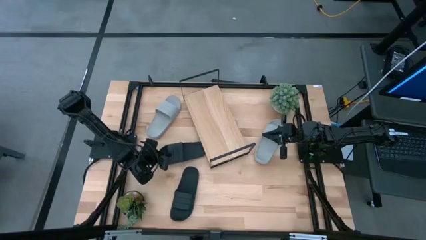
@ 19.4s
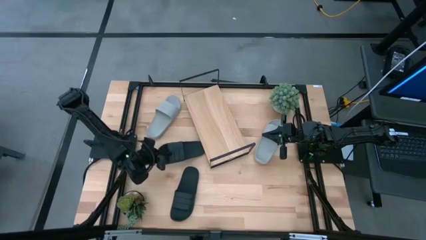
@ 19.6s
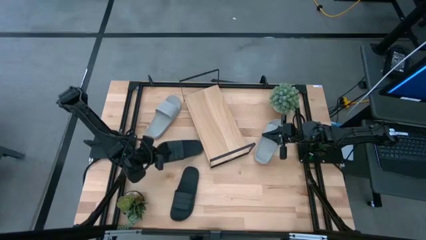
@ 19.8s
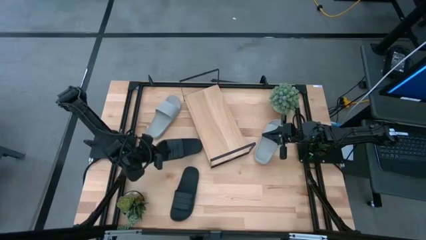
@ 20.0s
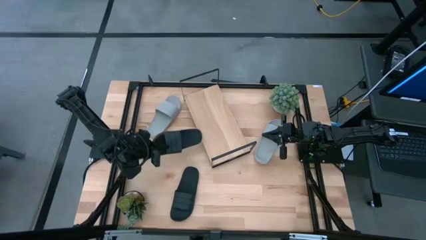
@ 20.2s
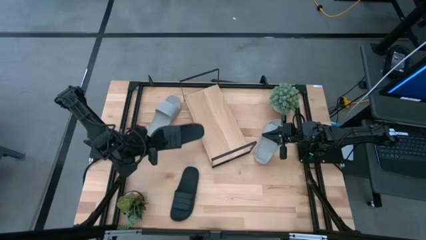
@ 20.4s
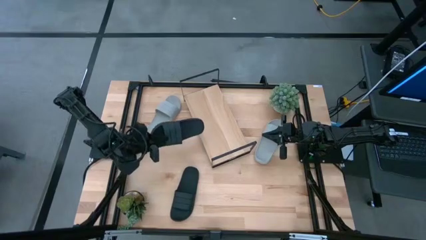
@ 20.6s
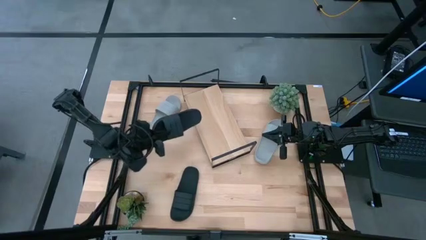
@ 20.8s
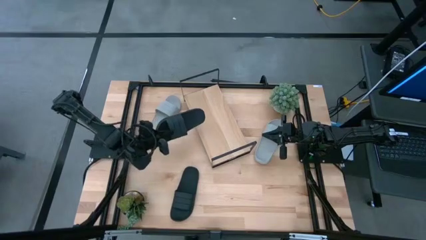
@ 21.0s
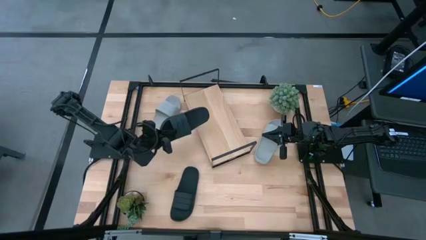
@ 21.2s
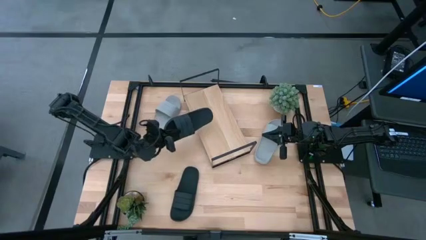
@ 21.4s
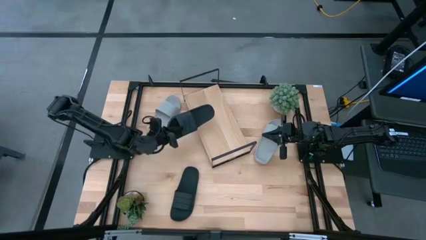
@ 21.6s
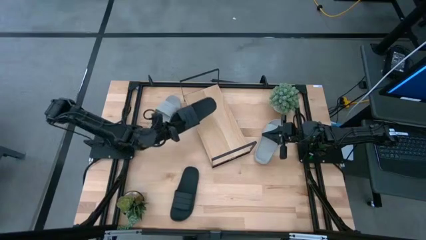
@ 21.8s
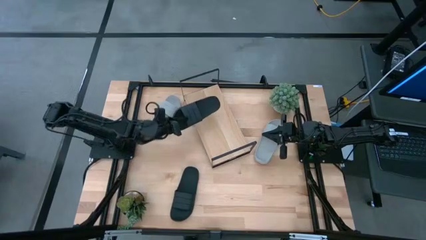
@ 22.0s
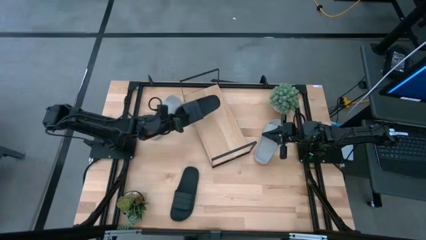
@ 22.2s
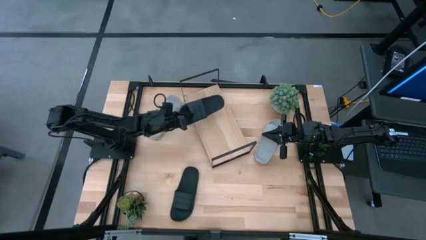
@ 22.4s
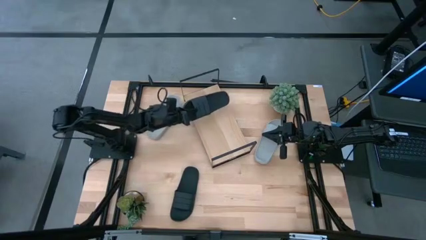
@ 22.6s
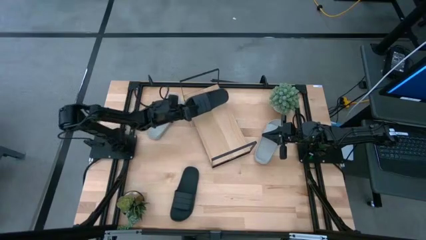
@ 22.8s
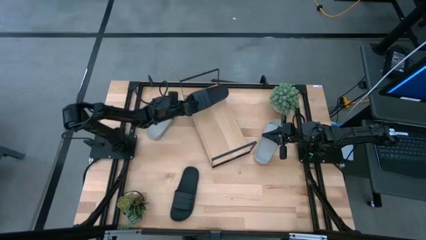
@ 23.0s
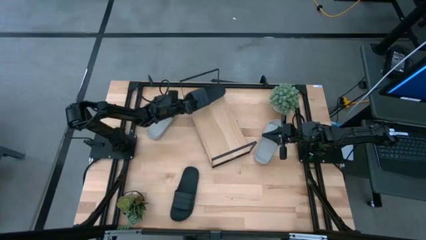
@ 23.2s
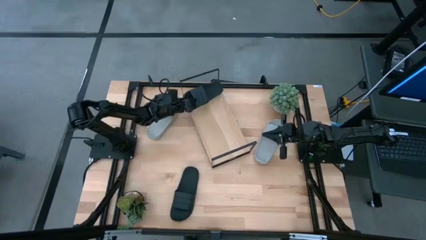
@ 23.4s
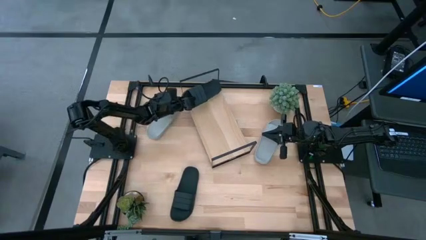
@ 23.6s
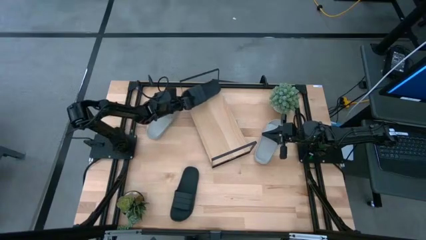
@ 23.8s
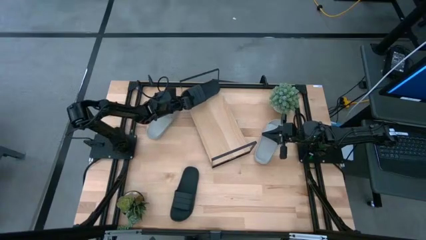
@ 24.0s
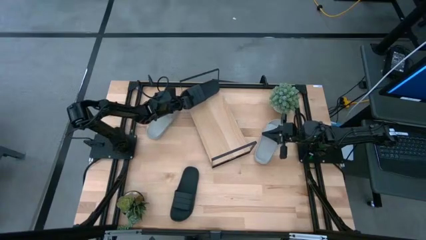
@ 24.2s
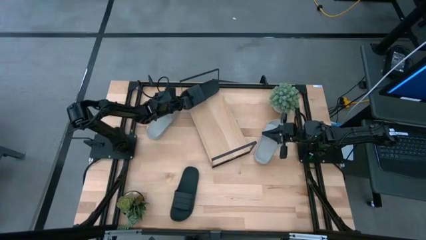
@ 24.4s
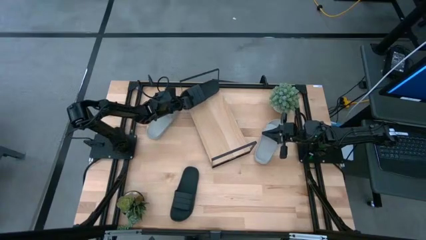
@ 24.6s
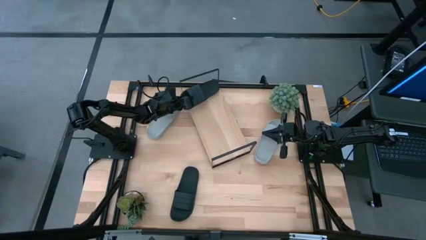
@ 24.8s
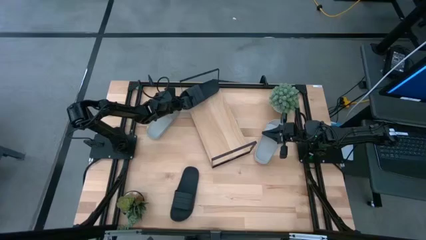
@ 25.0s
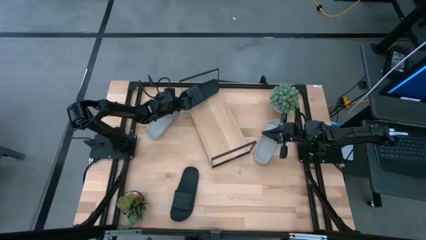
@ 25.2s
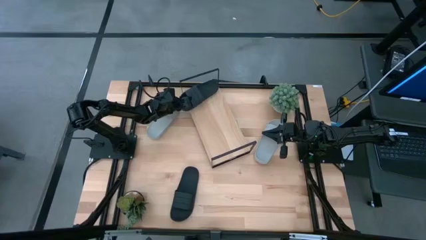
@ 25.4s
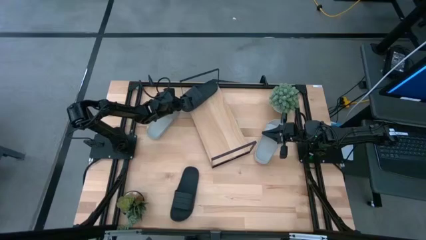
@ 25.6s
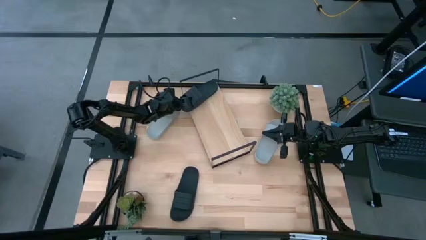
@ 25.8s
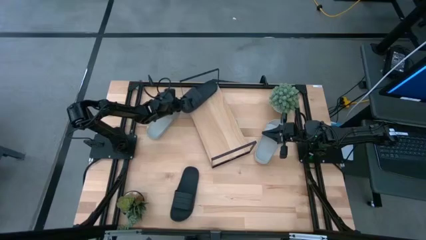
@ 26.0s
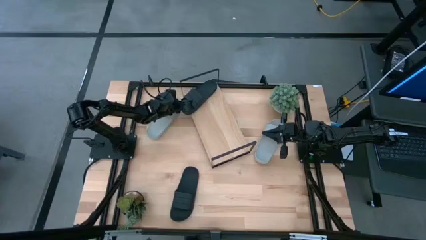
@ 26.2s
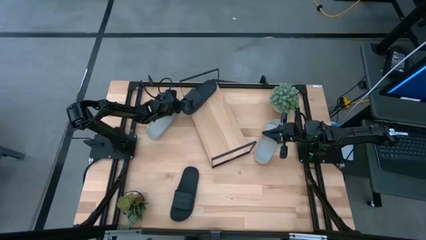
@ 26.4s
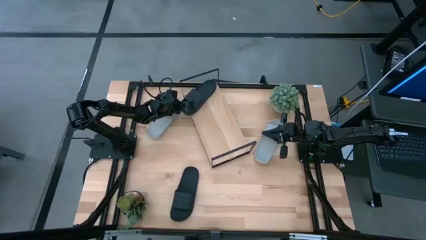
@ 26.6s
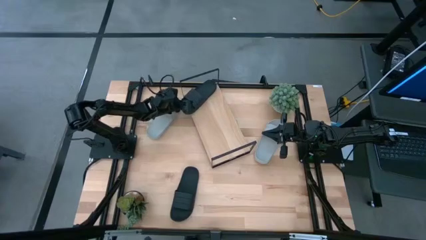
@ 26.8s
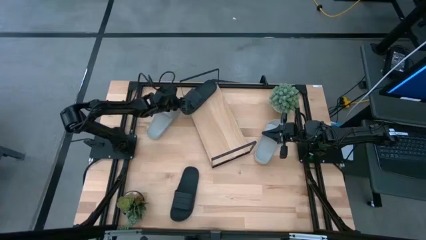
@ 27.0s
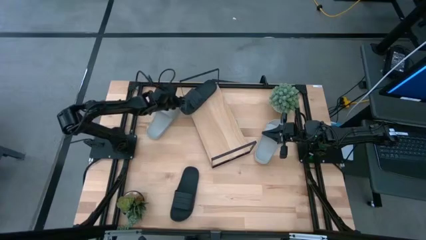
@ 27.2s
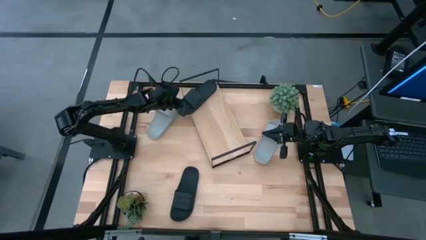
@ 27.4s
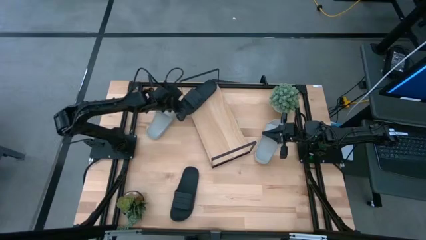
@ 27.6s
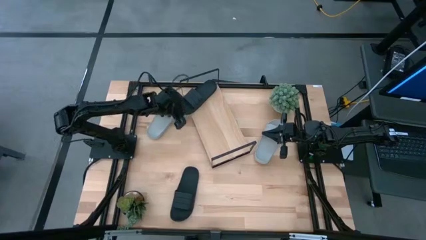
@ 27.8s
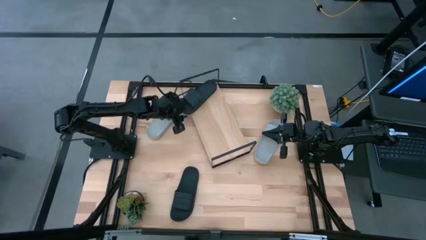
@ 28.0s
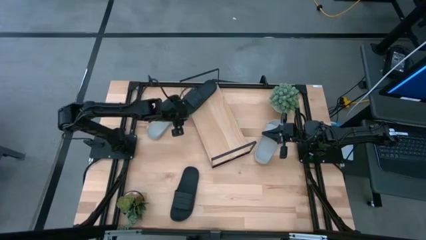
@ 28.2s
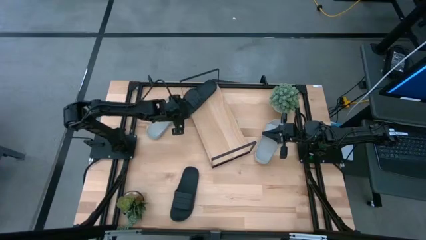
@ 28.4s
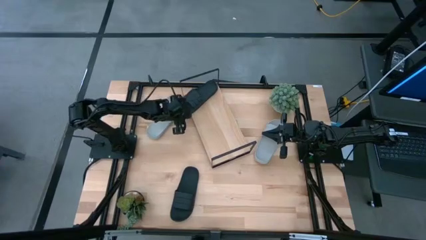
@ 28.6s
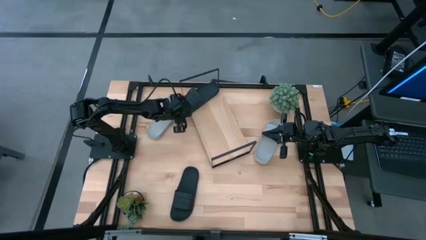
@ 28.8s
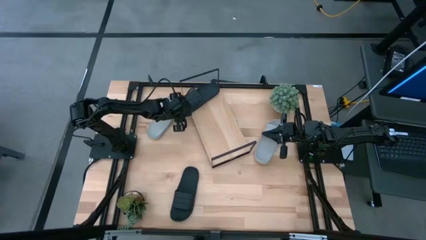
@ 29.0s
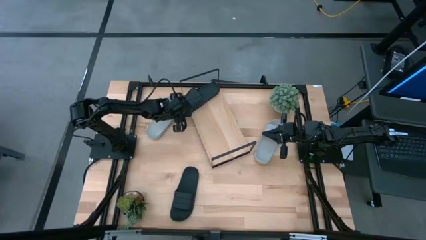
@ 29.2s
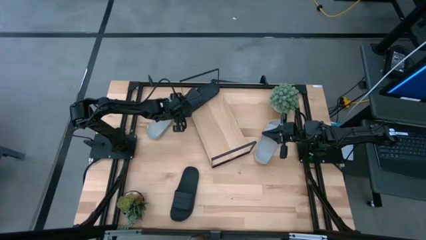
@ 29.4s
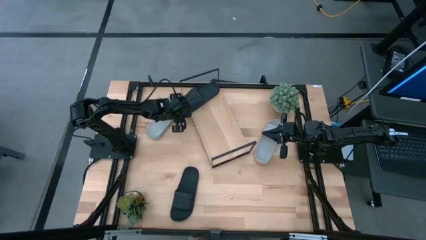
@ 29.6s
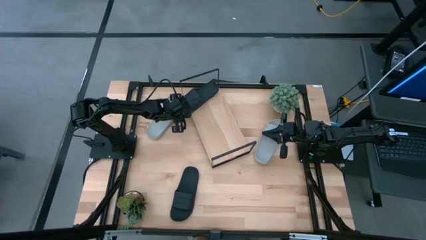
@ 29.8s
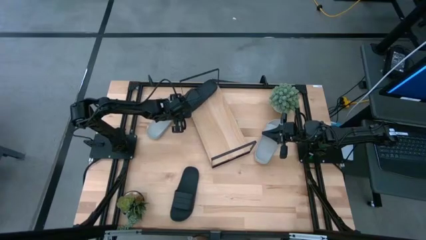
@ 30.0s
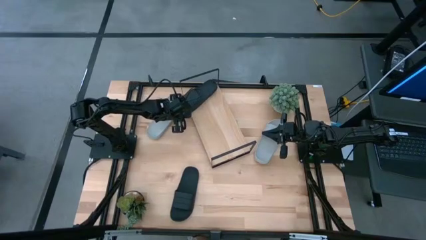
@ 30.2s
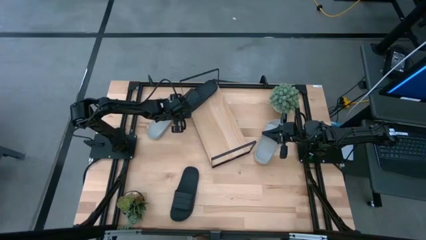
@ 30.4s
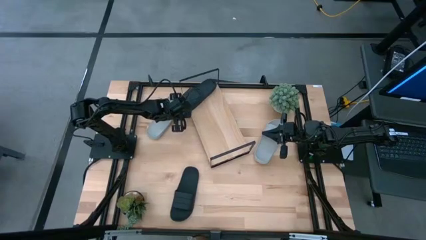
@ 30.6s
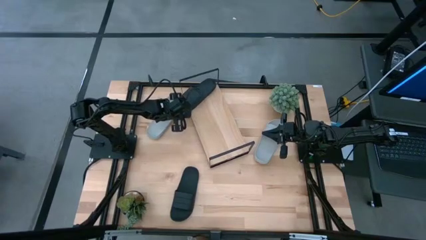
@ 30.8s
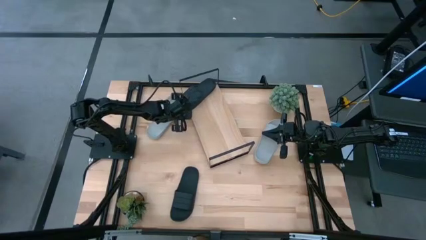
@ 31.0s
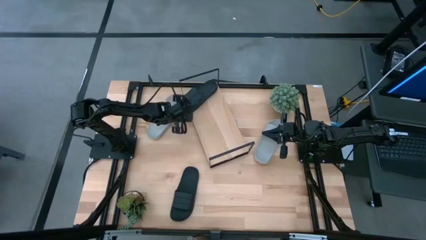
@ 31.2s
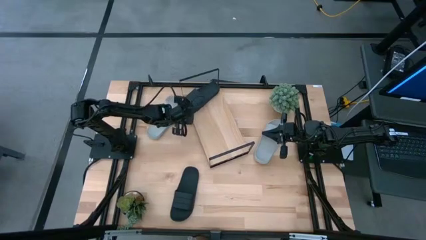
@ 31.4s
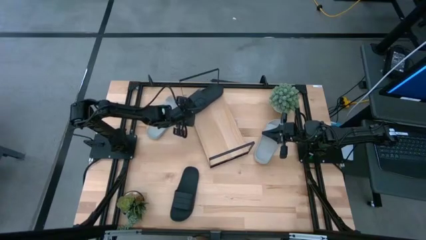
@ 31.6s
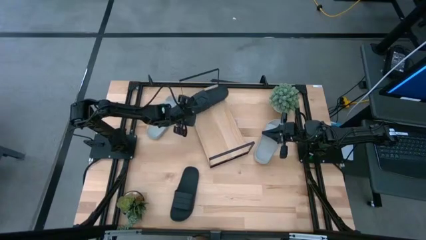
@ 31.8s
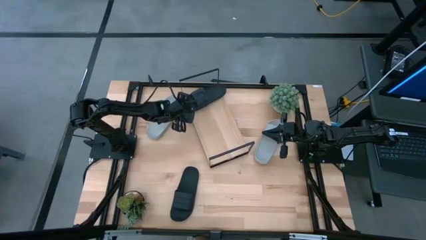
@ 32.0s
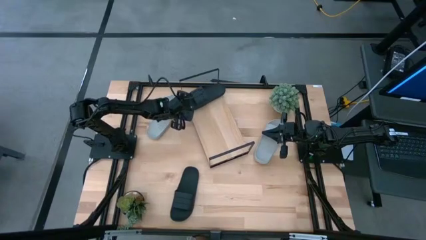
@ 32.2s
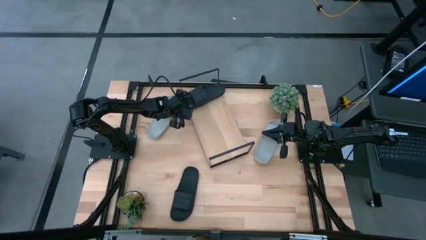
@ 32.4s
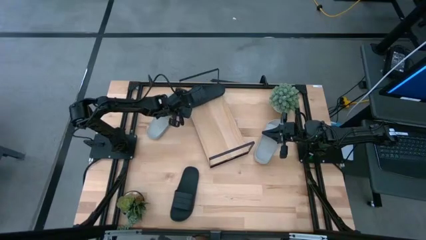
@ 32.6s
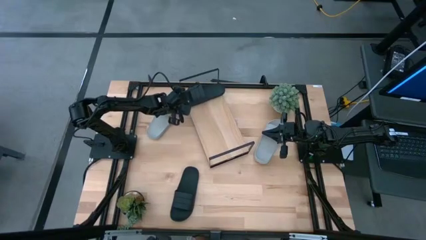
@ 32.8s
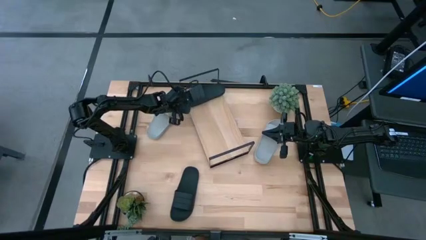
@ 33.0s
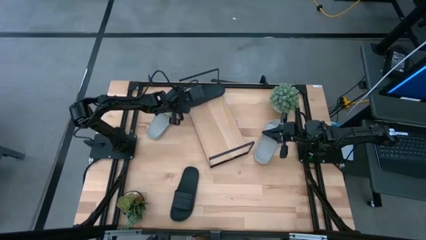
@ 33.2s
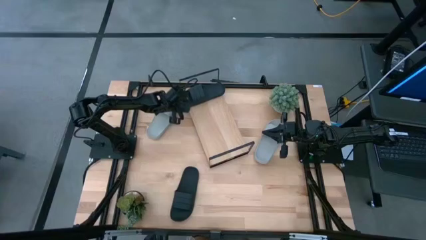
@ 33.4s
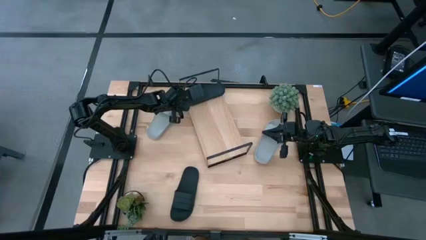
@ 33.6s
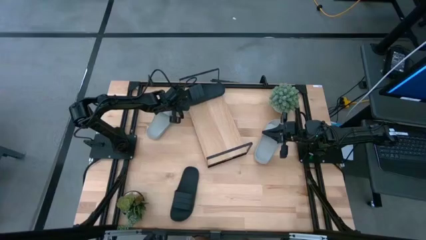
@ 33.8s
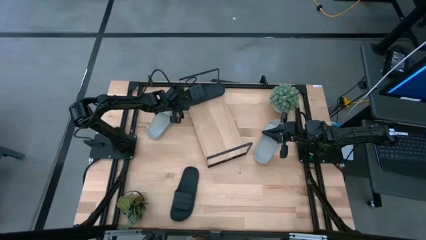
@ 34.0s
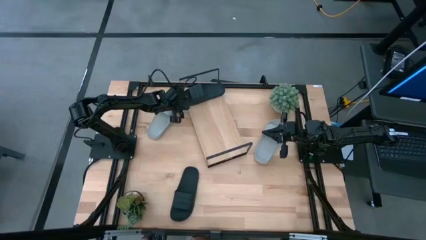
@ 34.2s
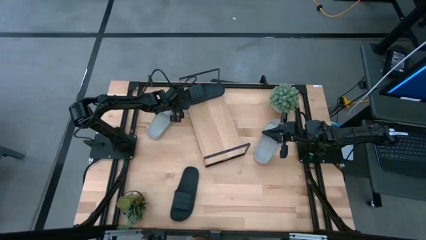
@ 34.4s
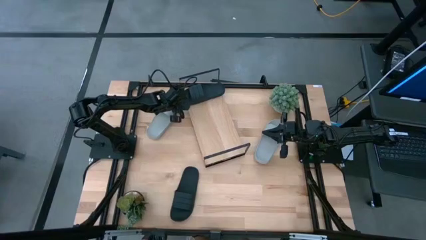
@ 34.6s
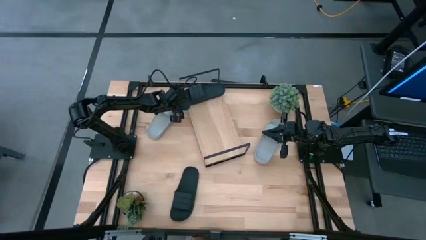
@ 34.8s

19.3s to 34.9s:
Task: Pick and place slides into the shelf
Put the top black slide on the shelf
